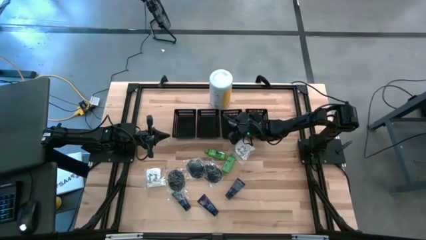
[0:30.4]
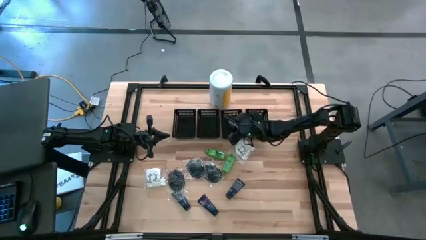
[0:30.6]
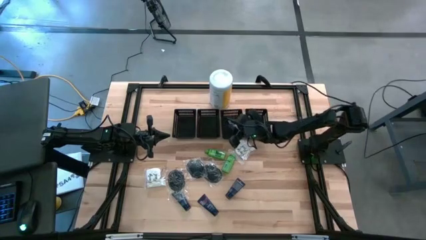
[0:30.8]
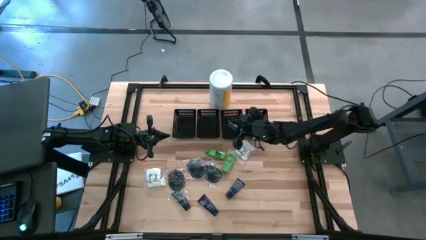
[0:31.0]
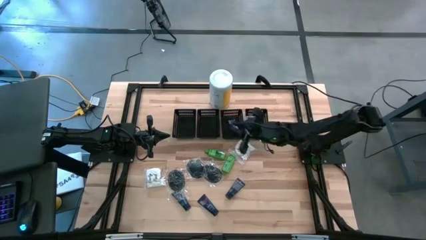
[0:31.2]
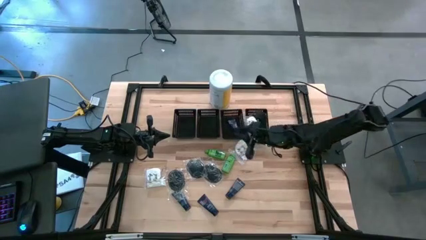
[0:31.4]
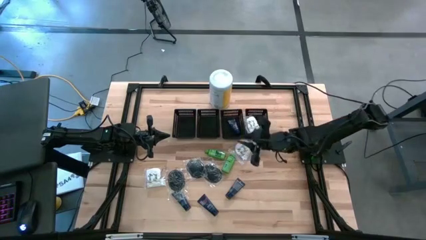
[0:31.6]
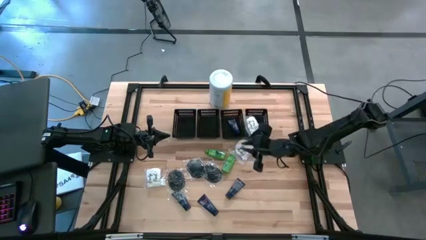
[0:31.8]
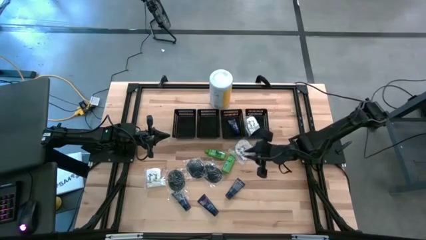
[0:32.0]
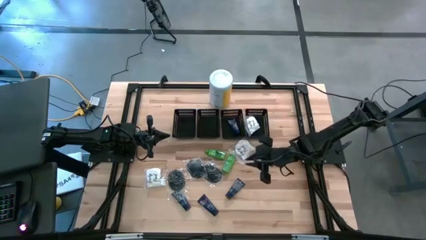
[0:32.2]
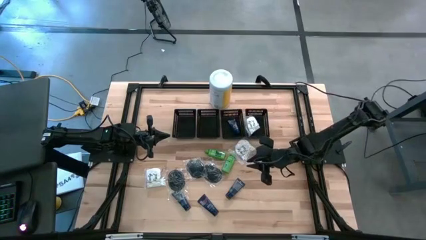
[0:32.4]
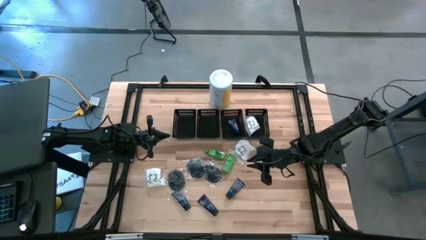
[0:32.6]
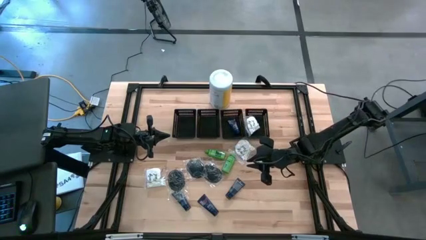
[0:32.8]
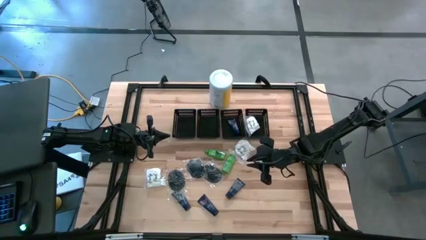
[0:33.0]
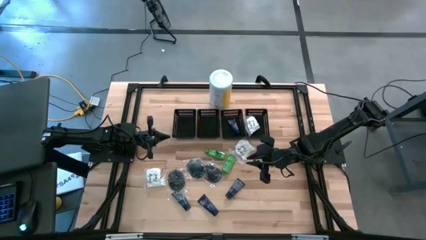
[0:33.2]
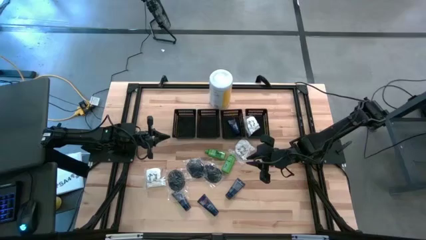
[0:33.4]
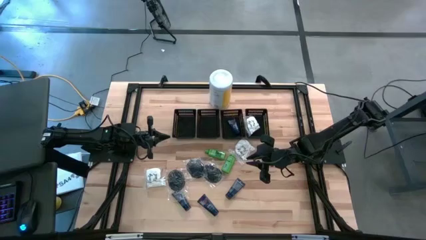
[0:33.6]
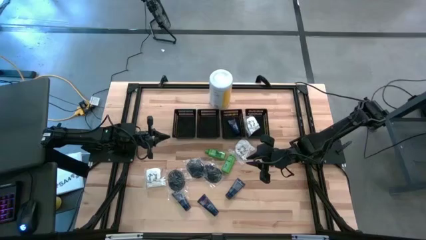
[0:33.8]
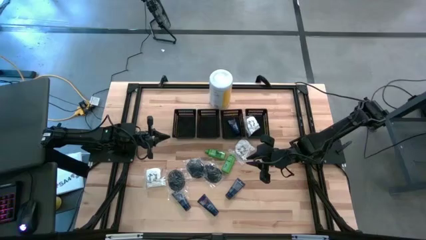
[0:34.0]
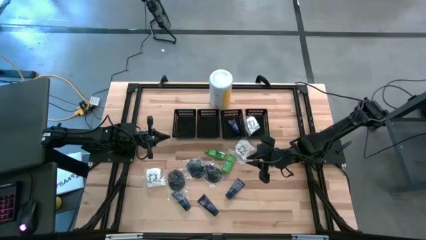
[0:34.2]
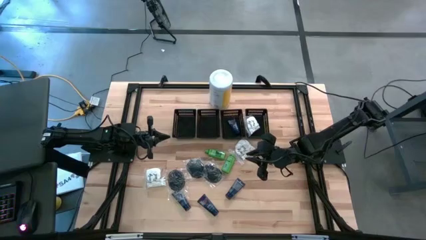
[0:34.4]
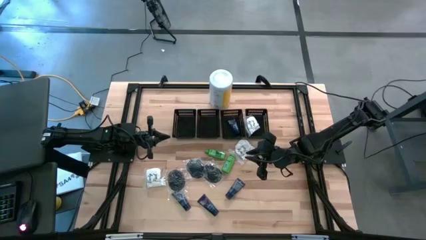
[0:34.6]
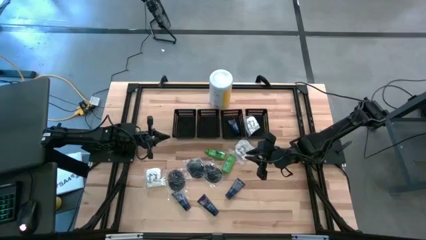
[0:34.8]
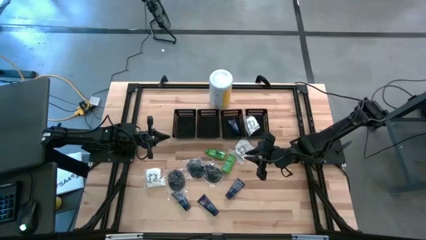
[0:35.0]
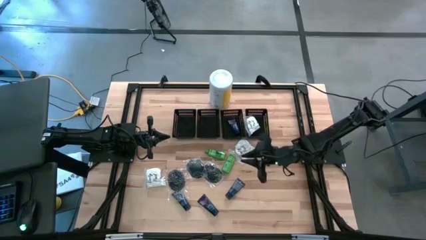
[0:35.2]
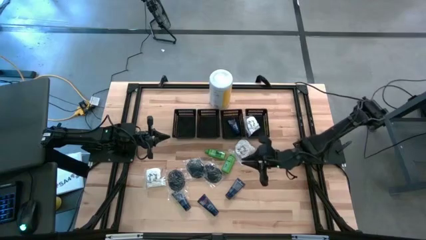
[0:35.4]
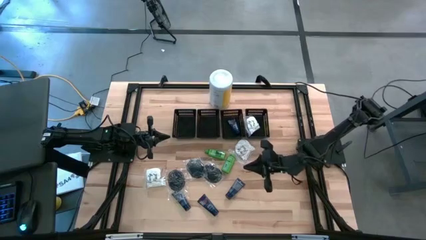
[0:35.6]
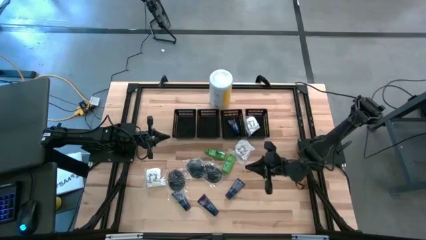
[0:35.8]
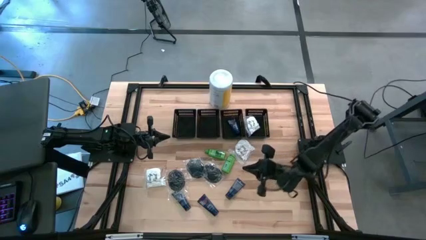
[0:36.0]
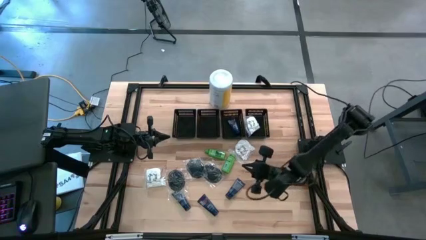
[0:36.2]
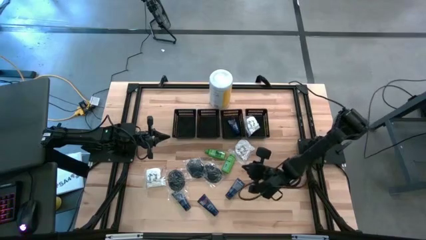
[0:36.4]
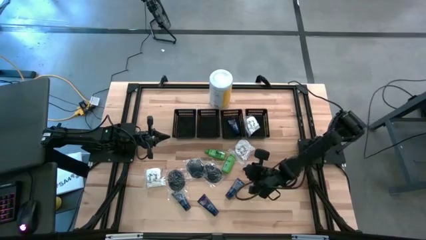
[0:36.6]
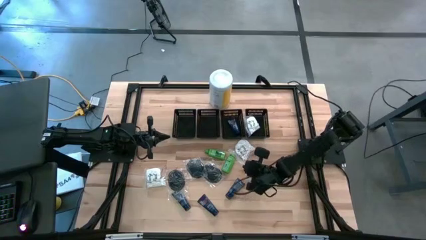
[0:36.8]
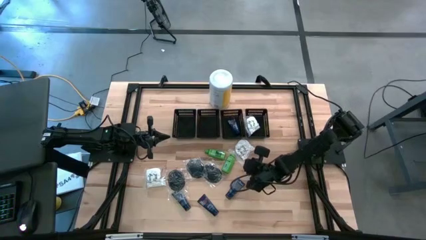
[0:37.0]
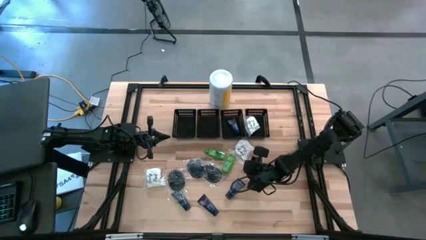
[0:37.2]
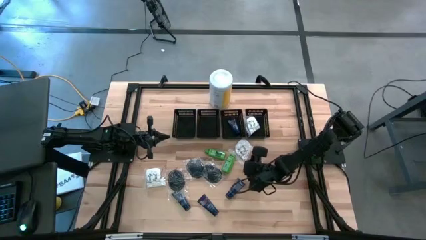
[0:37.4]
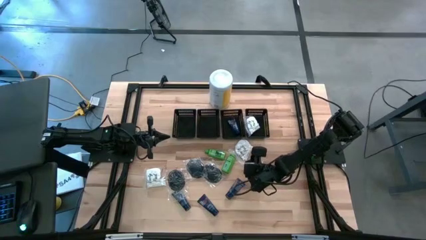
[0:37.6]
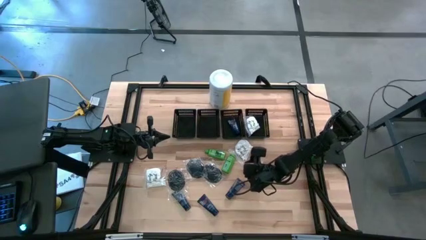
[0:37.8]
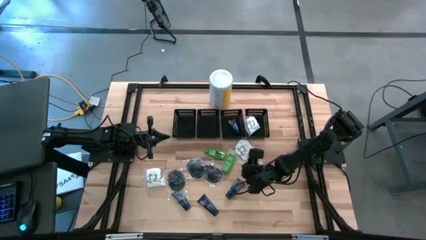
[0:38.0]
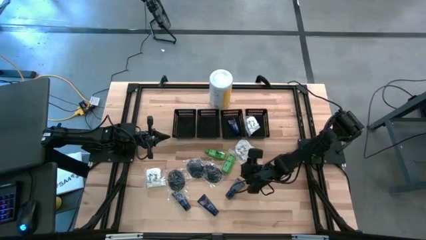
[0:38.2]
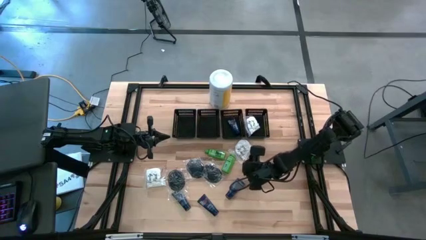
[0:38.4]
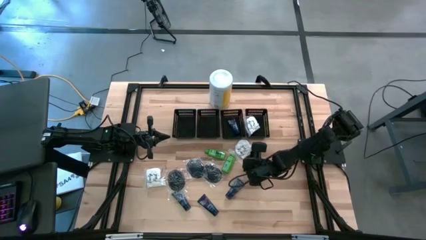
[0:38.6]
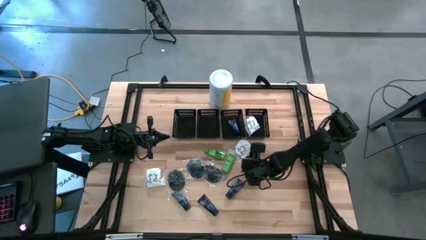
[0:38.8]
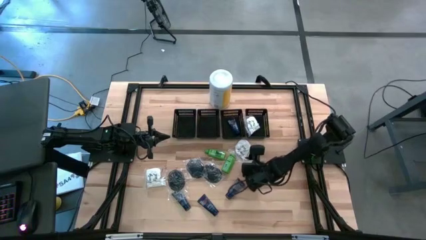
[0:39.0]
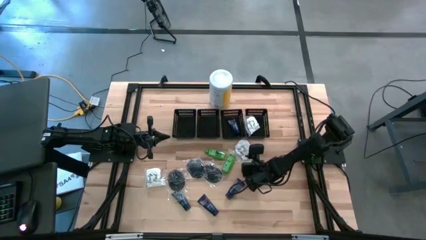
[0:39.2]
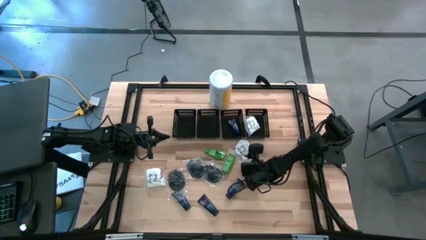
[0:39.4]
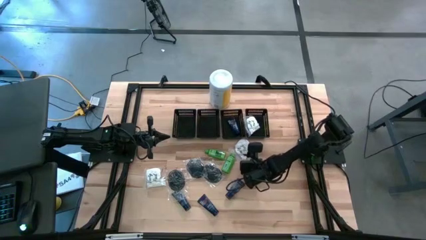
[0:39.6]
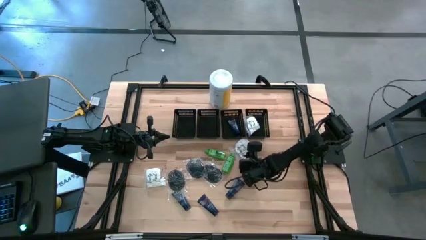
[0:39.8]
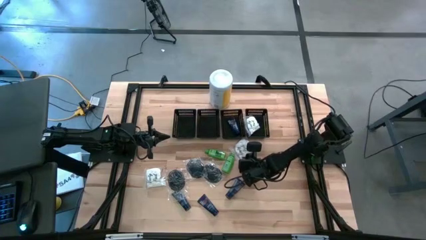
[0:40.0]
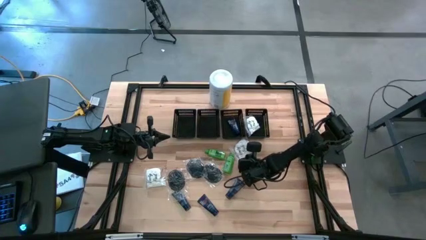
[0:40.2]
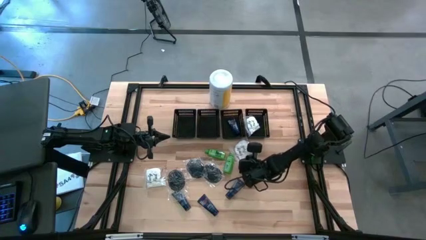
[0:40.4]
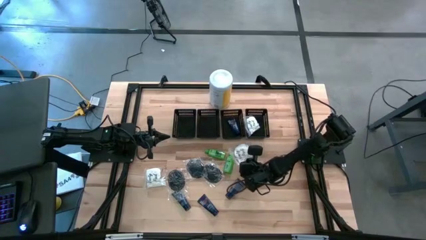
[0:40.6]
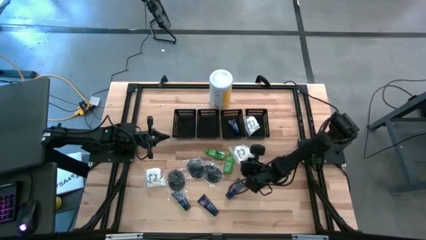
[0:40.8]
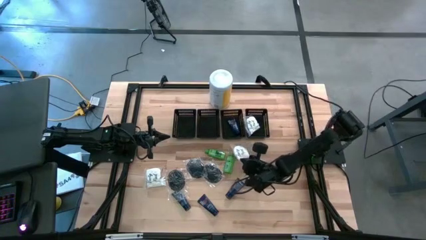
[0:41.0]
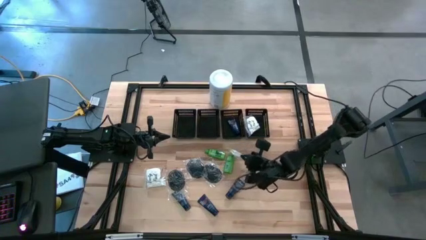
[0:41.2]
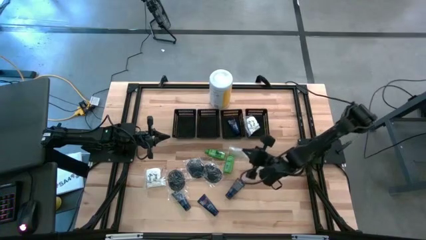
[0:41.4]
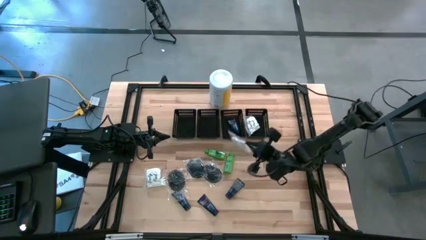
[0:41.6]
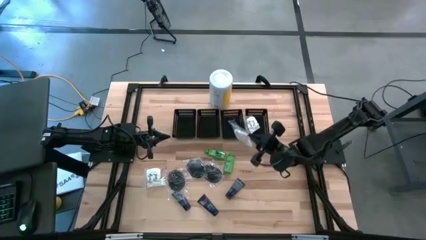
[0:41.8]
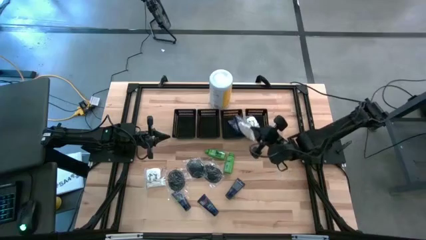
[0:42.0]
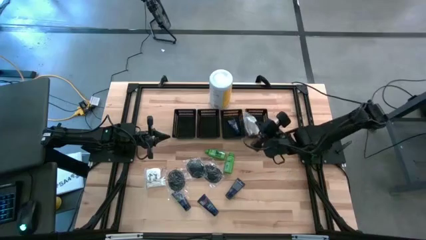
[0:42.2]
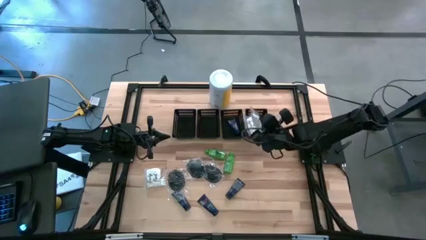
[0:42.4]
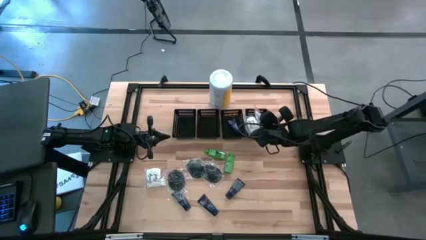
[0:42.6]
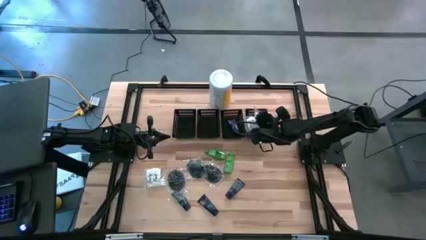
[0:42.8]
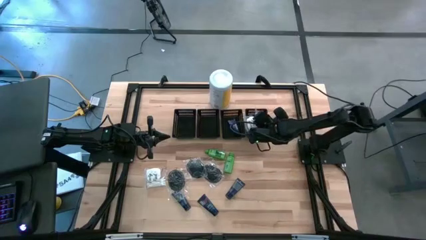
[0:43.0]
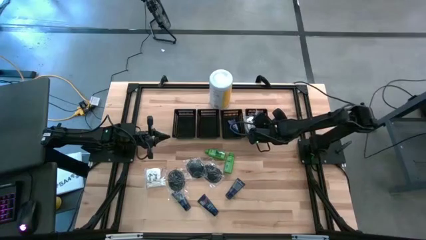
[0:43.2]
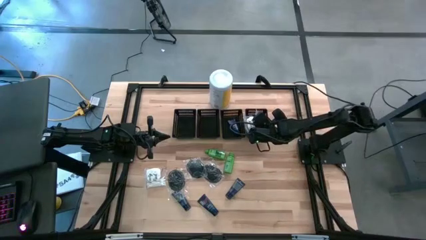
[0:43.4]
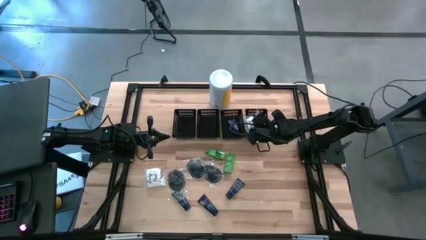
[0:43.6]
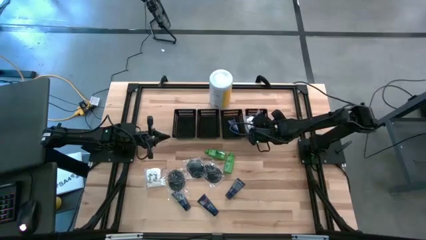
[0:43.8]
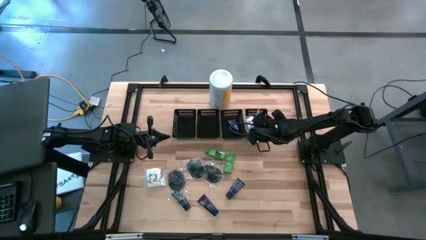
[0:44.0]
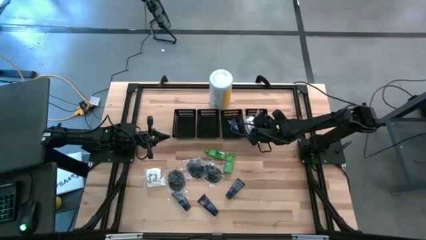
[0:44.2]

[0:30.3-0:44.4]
Task: Pick & Place Travel size toiletries
Put the right cotton pack into the right black bin

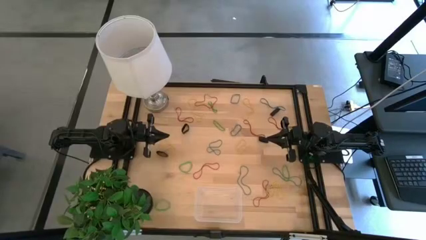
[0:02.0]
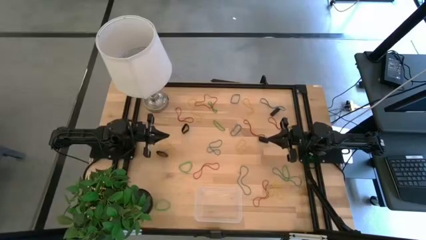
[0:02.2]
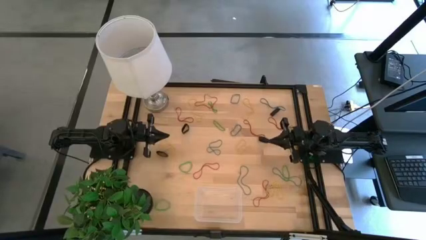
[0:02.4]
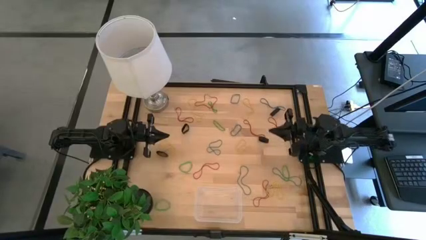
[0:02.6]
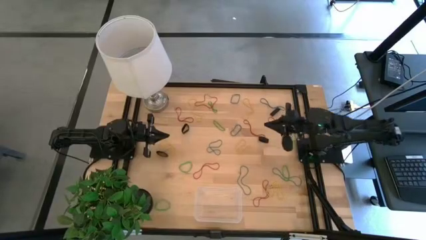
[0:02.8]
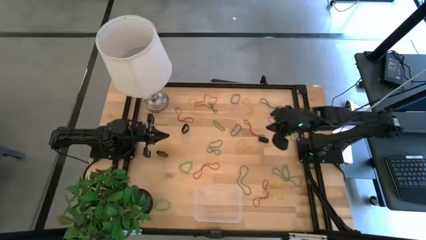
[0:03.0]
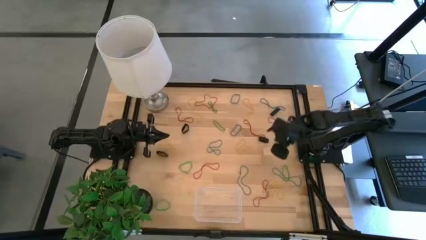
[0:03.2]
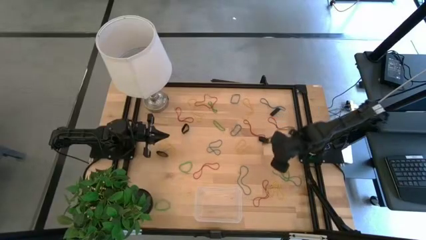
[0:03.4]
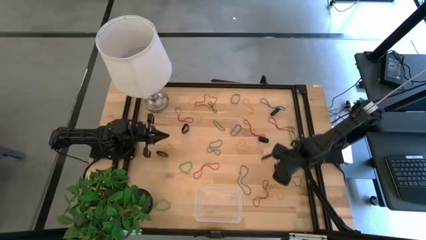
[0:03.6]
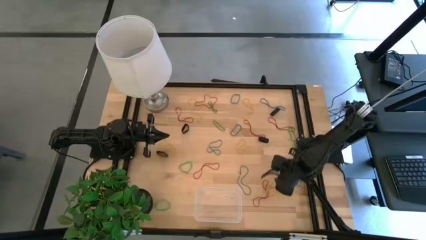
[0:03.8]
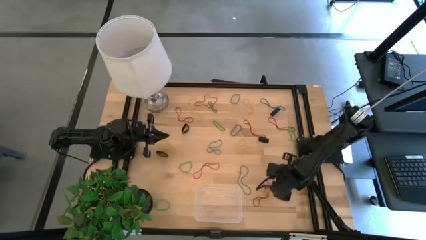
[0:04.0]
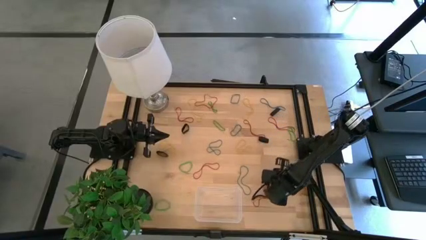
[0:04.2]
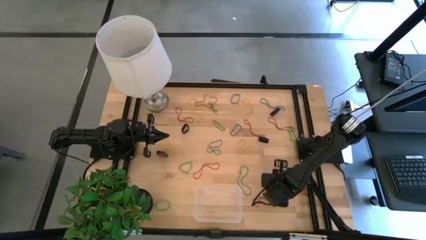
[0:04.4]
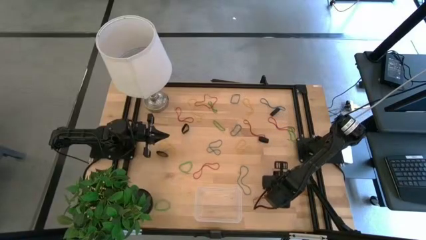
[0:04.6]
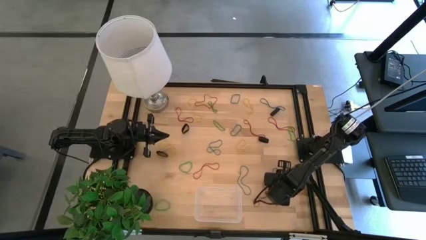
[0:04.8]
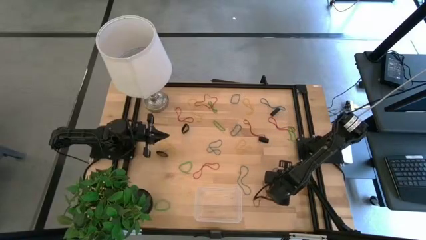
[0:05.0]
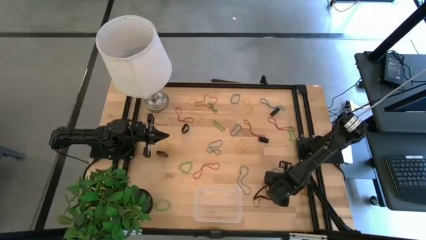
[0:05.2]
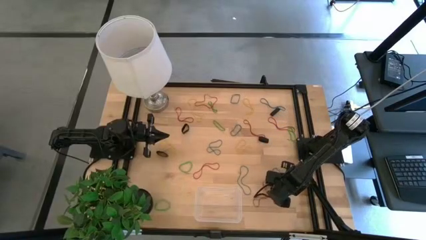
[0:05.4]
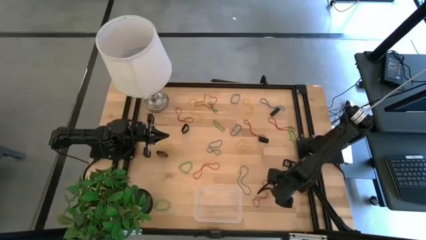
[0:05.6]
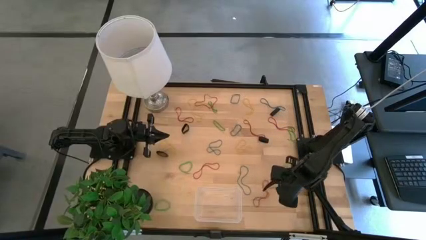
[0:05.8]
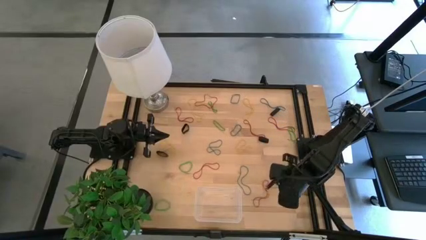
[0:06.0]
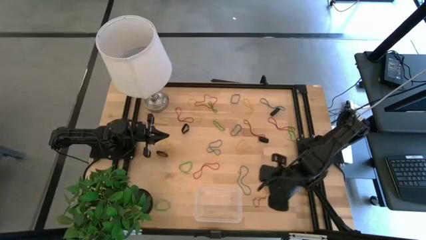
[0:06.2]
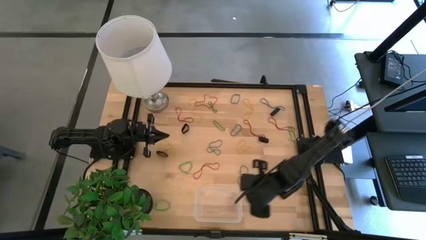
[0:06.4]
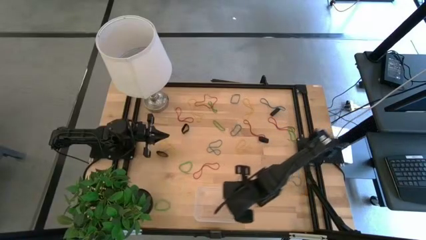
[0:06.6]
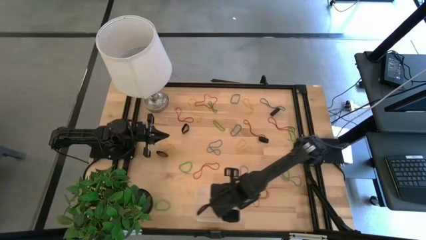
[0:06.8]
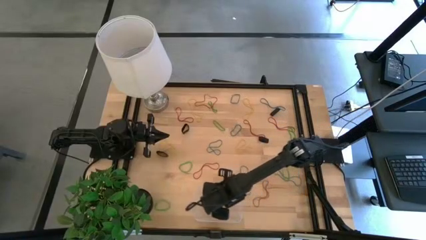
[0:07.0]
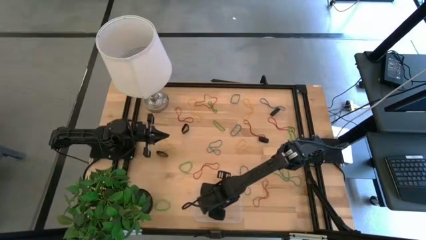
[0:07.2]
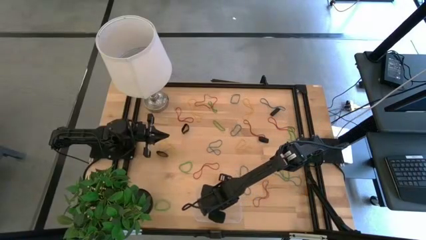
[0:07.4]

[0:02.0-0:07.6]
Task: Pick and place rubber bands into bin
Put the yellow rubber band into the transparent bin
